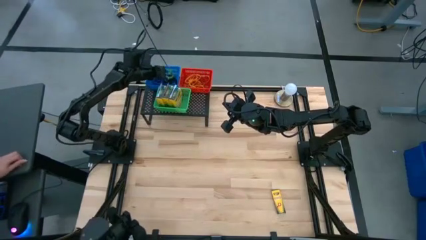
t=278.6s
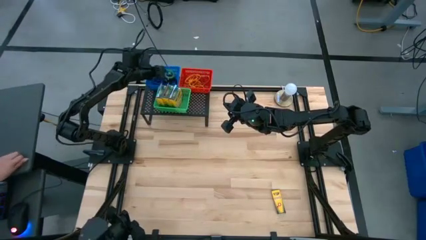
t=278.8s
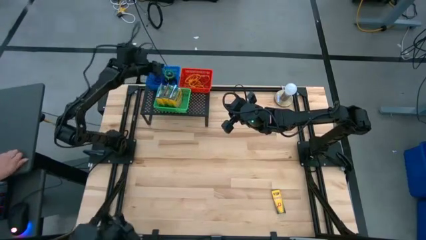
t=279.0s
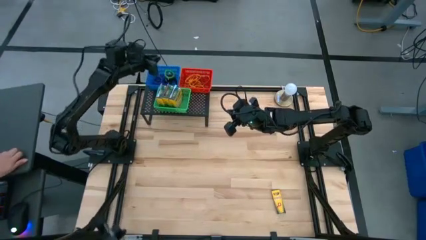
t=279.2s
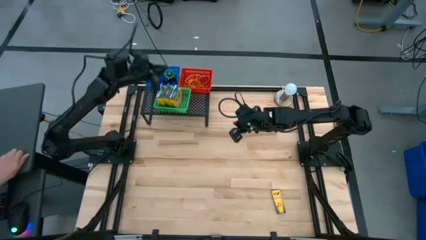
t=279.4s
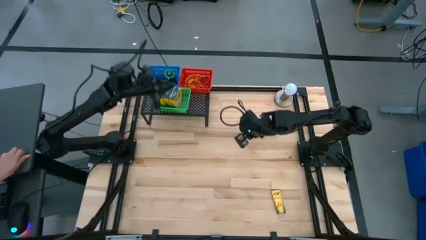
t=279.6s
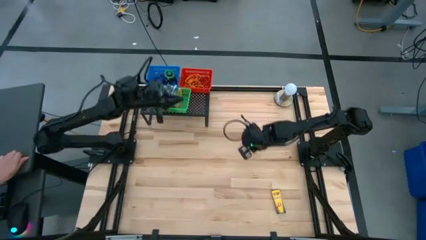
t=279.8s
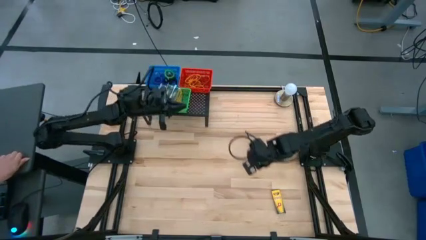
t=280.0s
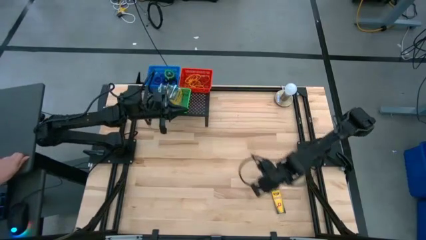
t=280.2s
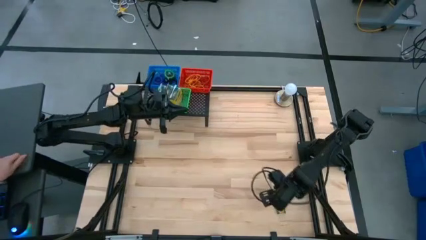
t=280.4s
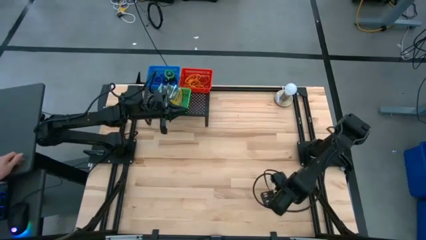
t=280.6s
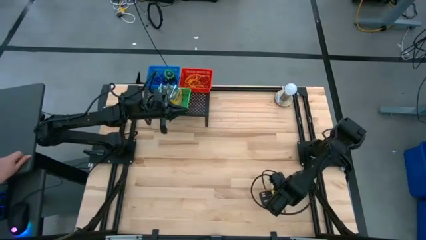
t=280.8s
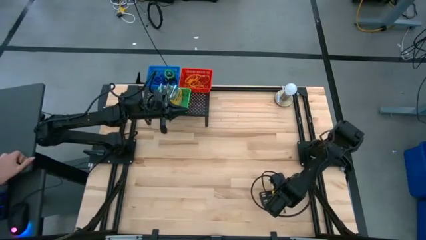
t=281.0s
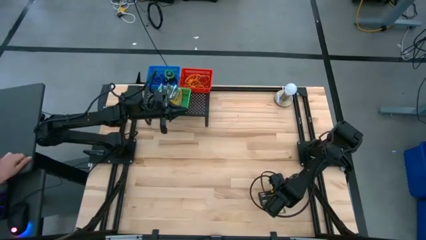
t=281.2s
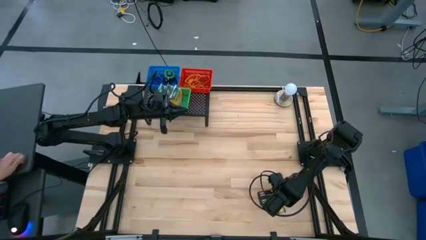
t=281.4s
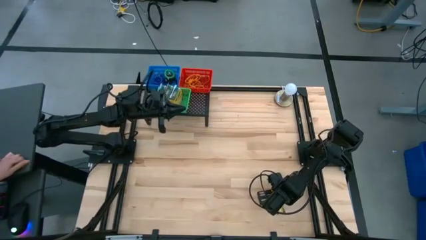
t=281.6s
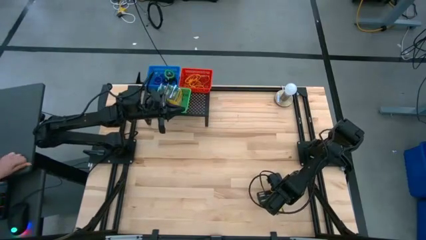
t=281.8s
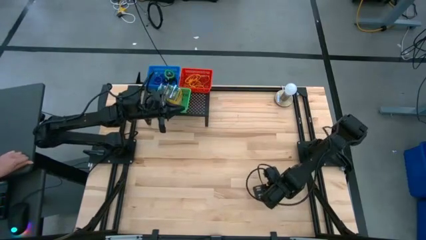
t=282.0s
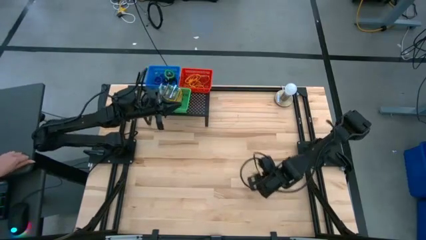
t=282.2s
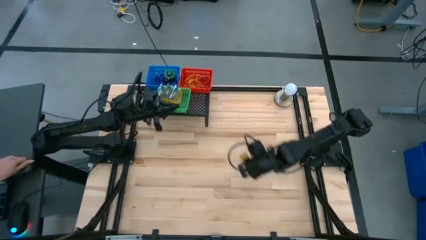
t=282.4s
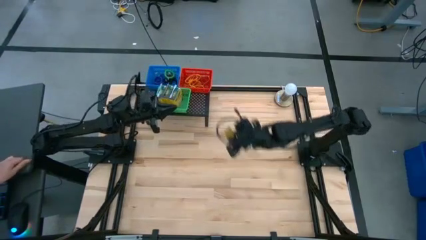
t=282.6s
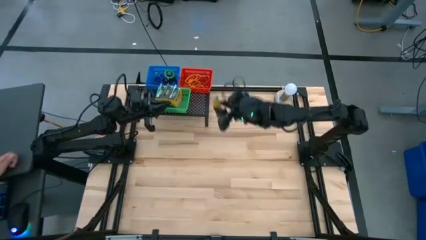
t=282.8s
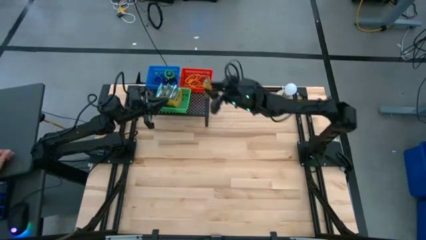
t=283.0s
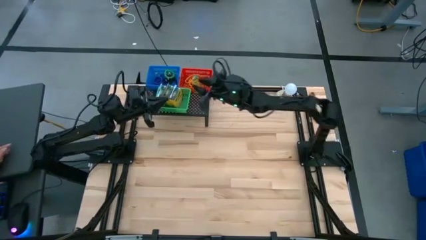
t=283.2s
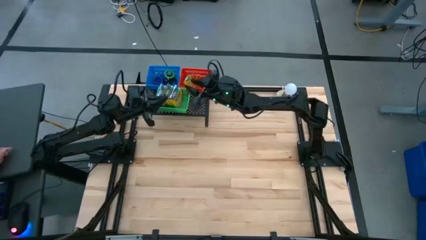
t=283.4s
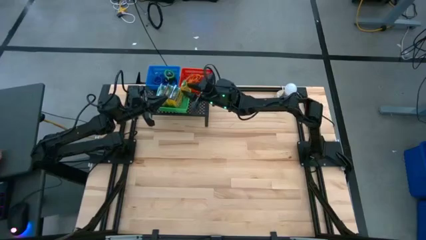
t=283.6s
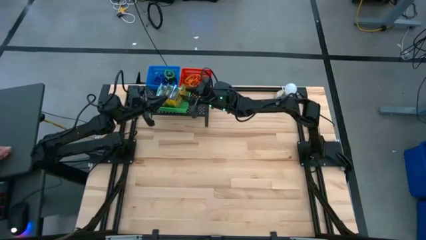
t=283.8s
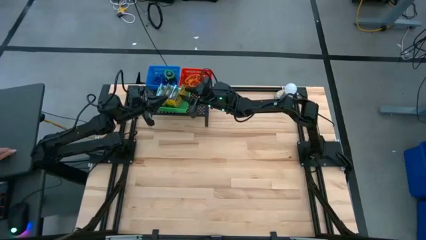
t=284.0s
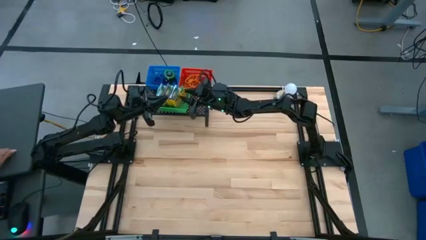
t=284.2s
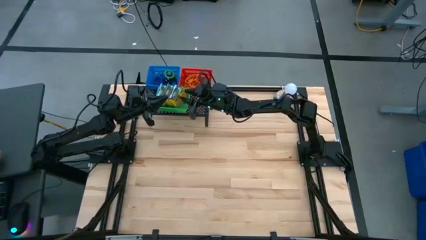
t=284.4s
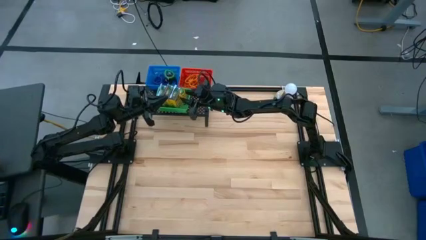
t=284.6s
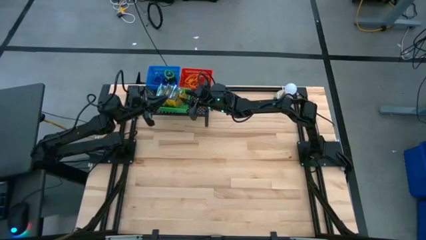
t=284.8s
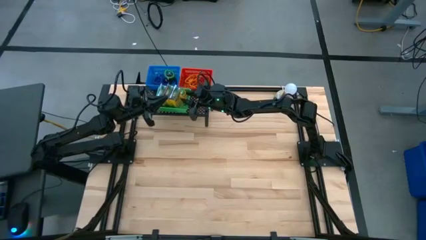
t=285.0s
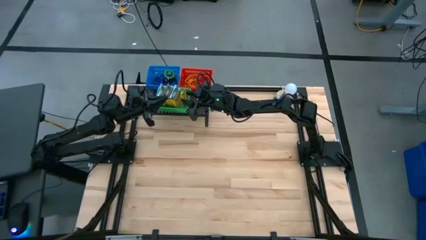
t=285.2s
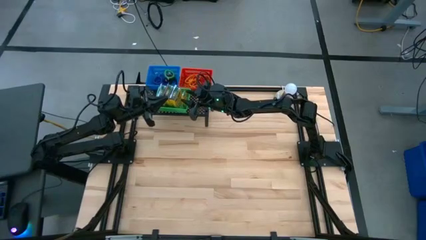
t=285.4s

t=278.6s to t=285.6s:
Task: Pick & Place Office Desk Supplies
Put the crayon box into the green bin

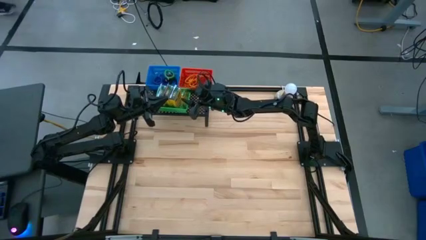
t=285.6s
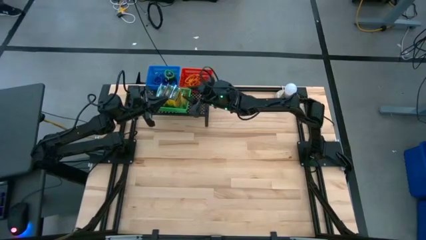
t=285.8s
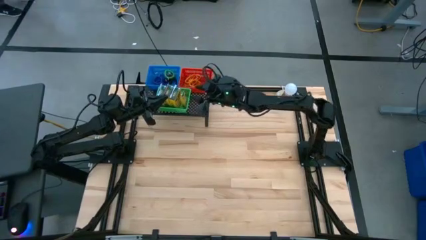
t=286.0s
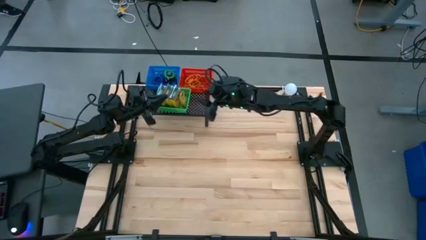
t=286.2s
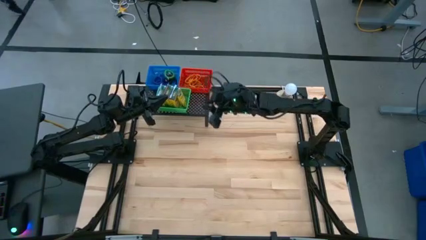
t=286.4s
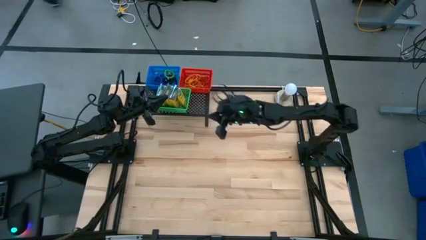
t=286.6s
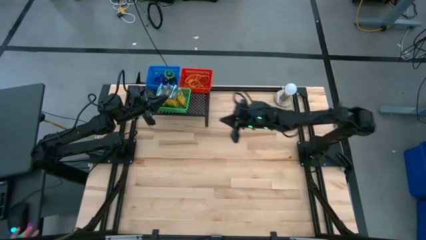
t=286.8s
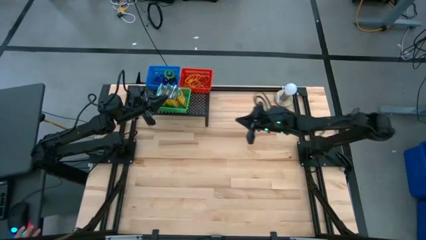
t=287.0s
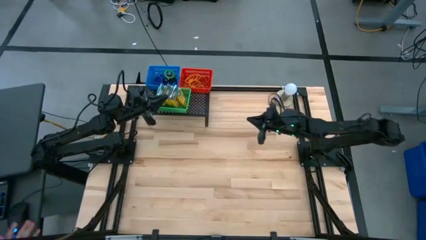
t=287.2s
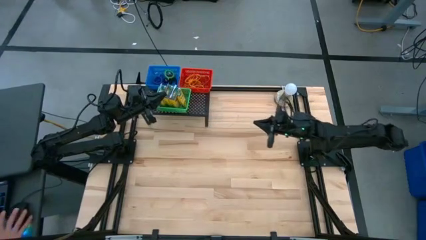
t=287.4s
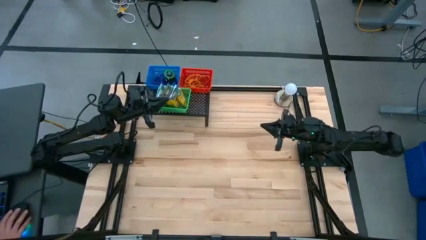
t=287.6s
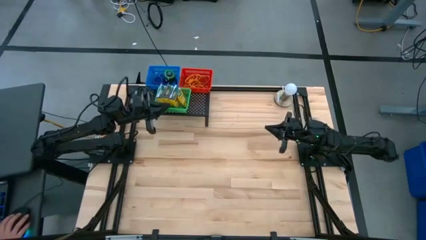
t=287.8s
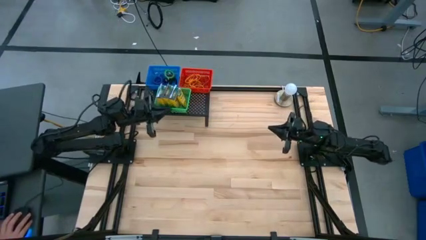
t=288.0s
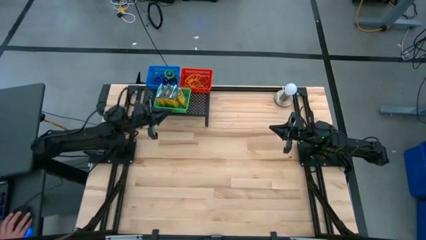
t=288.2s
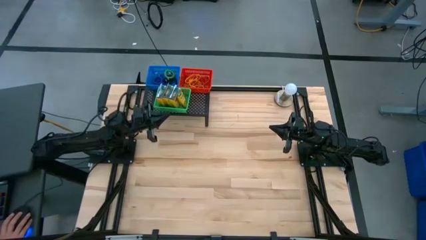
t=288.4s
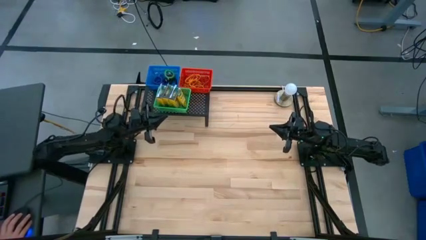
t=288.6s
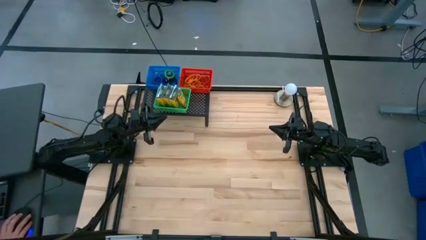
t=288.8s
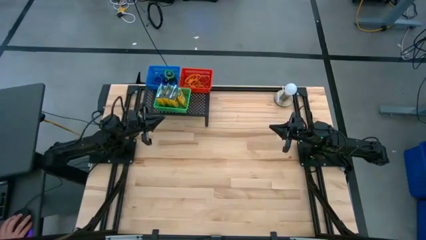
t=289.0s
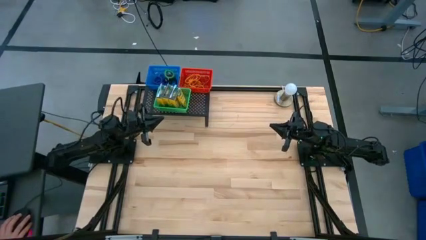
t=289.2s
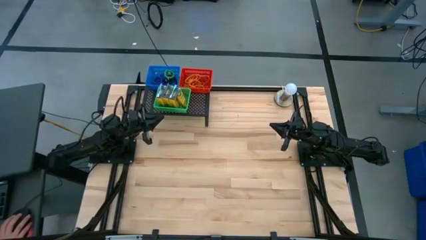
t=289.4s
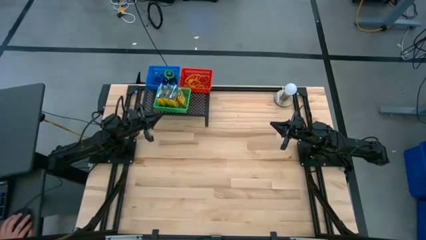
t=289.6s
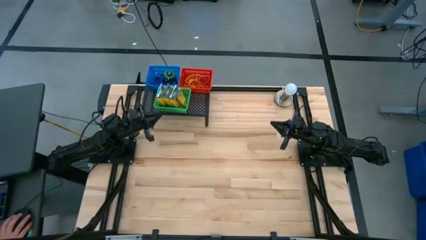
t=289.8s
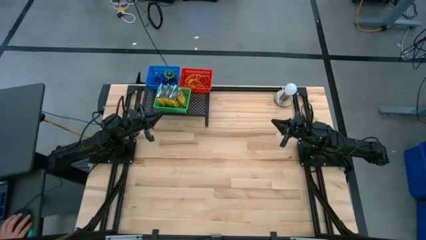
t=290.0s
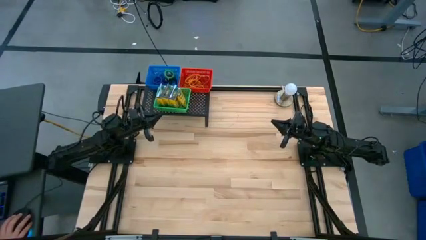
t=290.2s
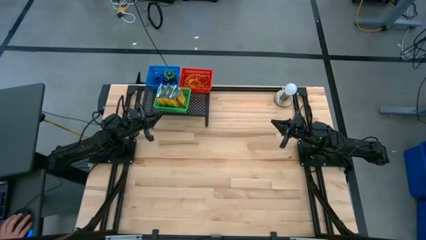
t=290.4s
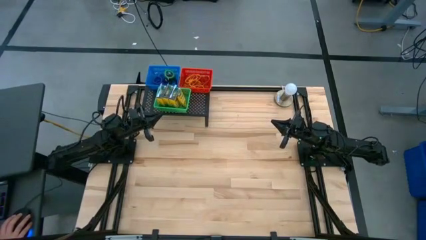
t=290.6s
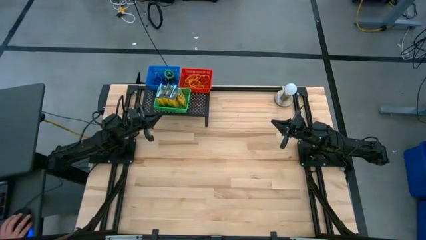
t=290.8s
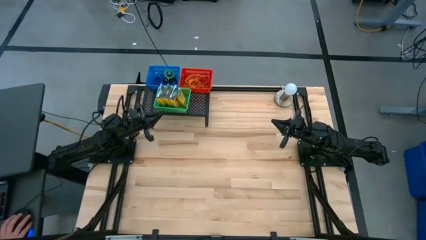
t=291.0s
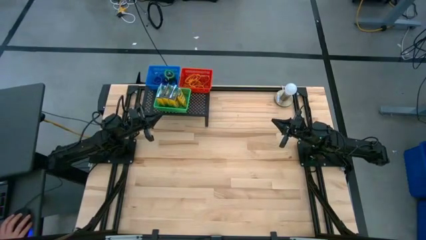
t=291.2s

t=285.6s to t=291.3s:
Return to Home Position

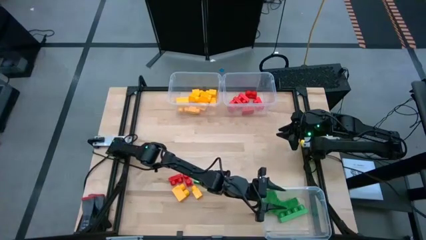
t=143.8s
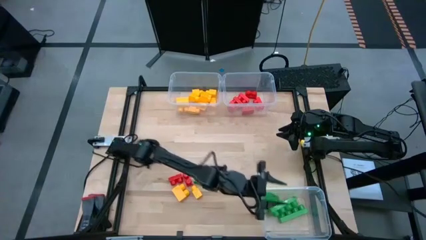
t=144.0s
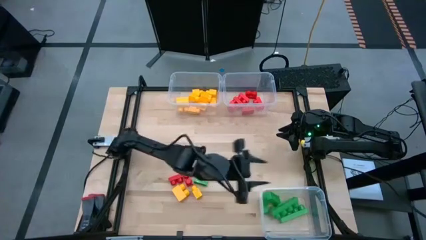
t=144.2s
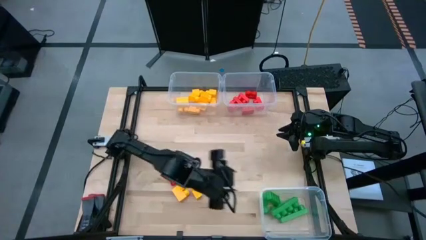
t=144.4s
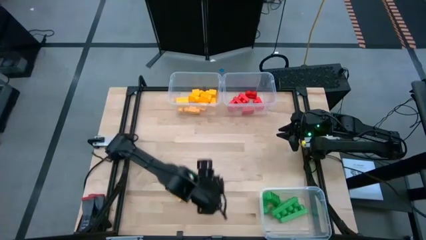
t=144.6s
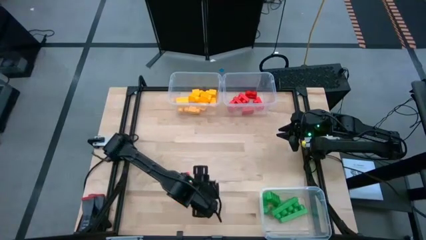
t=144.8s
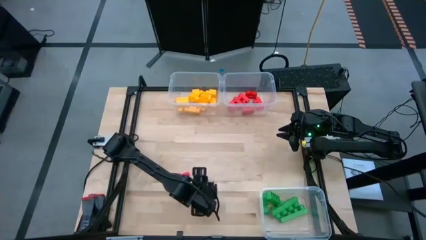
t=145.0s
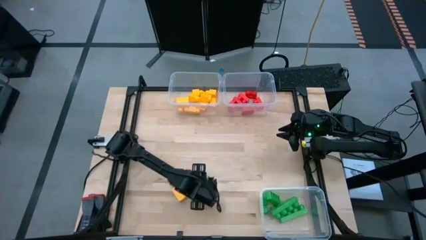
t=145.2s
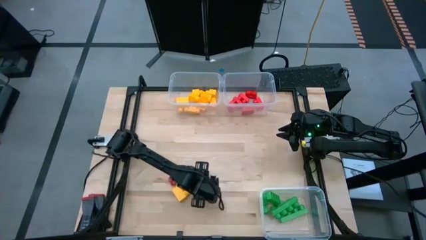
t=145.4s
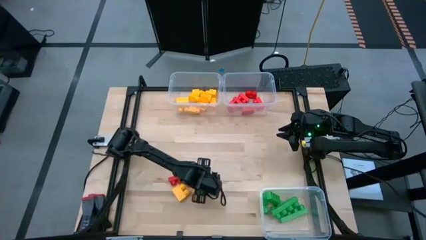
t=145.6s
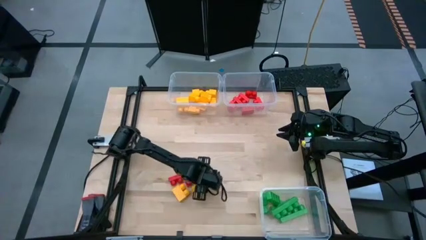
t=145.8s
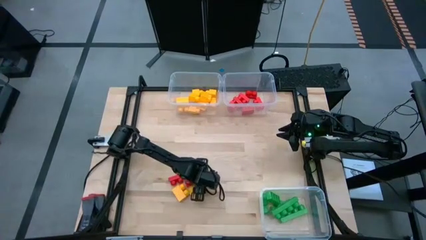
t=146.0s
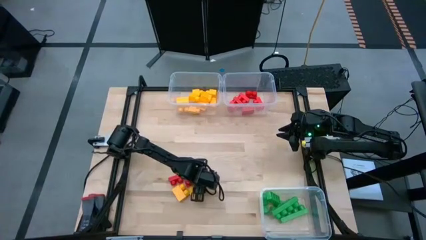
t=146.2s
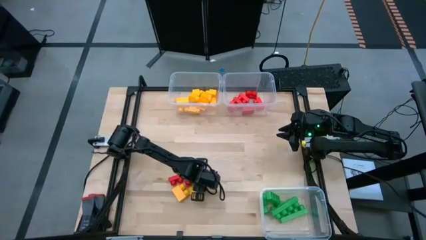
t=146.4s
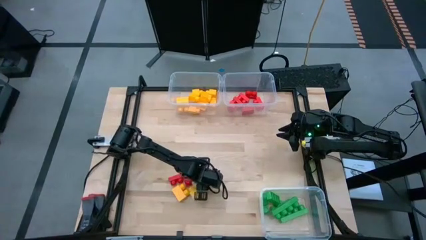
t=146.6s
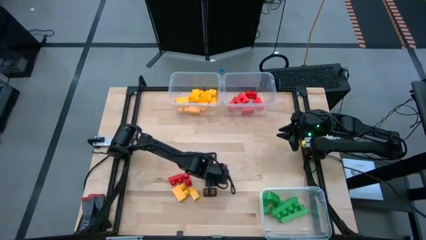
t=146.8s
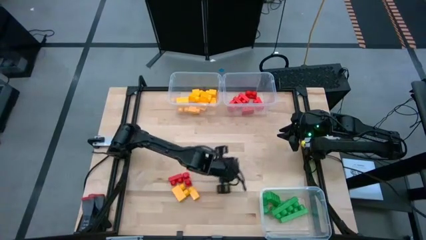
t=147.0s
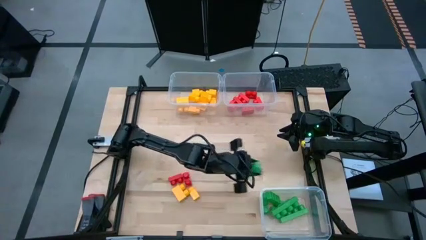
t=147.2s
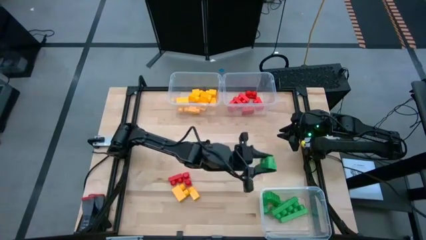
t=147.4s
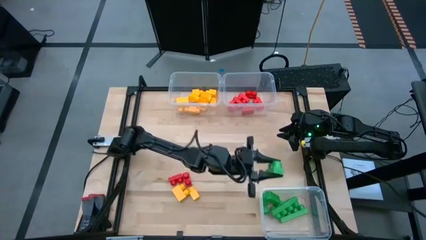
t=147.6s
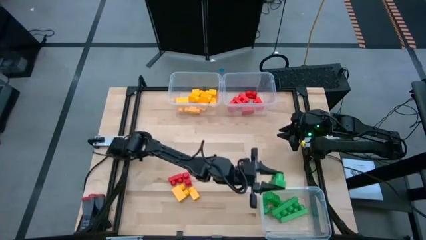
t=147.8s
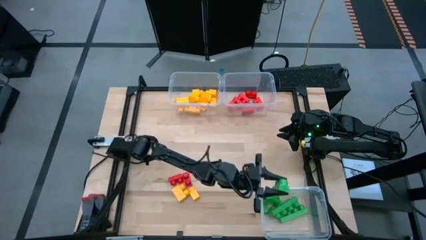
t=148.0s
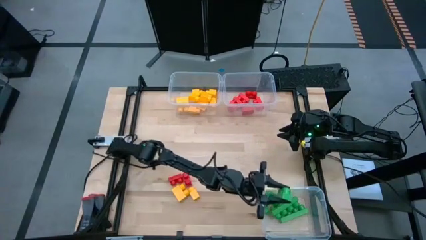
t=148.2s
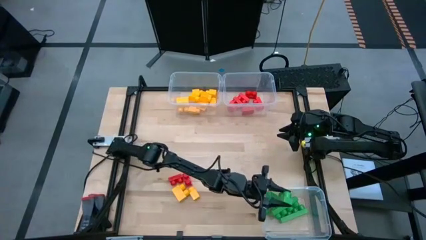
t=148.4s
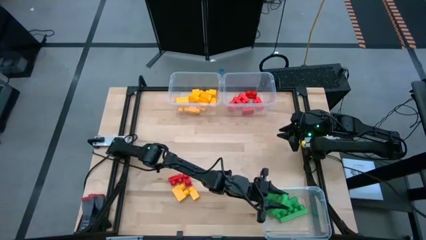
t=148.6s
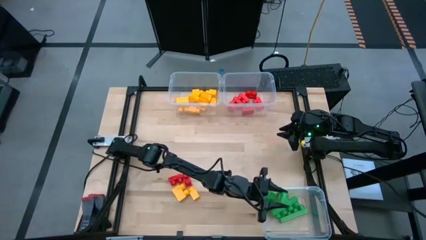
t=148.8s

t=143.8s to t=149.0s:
Task: Sort blocks
Put the green game piece into the bottom right transparent bin
